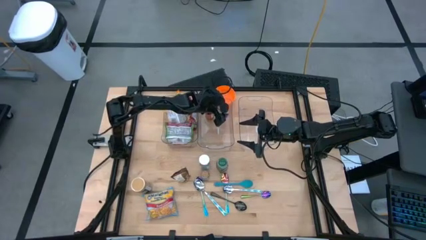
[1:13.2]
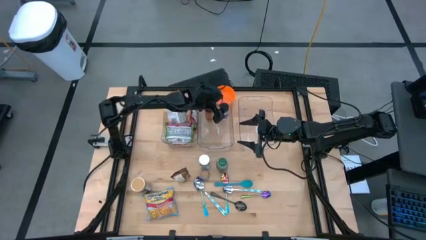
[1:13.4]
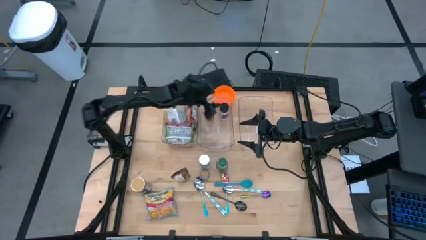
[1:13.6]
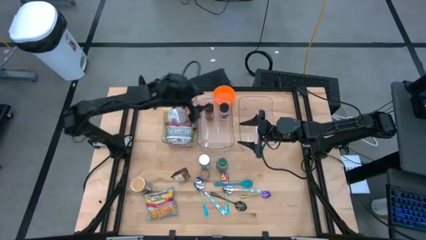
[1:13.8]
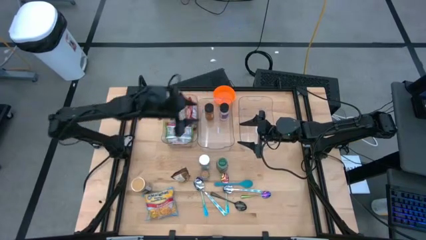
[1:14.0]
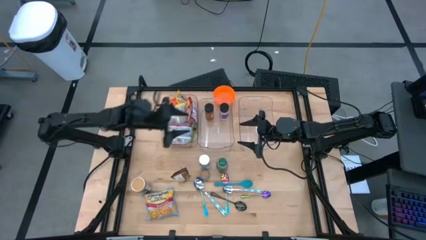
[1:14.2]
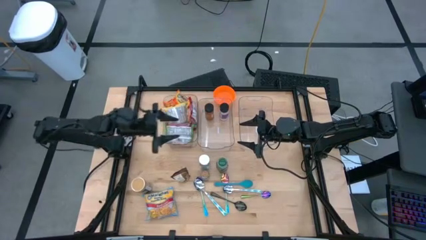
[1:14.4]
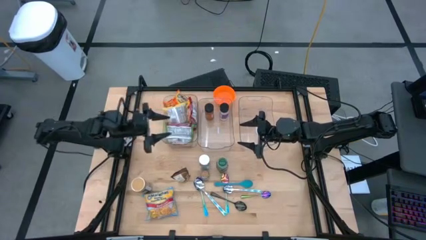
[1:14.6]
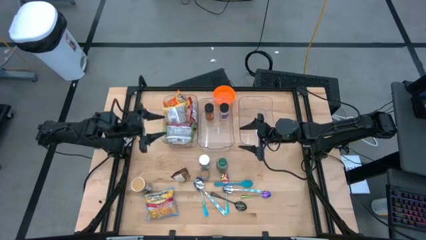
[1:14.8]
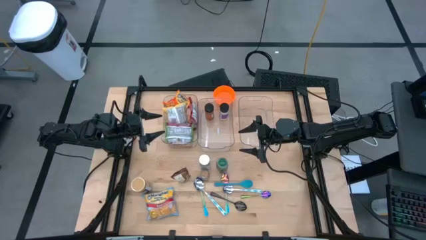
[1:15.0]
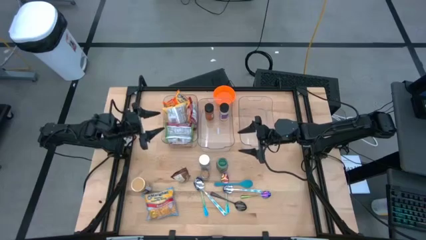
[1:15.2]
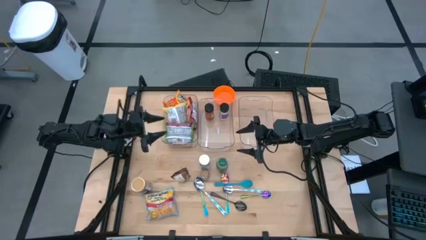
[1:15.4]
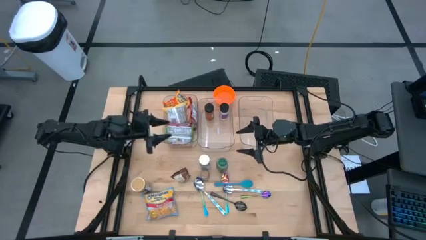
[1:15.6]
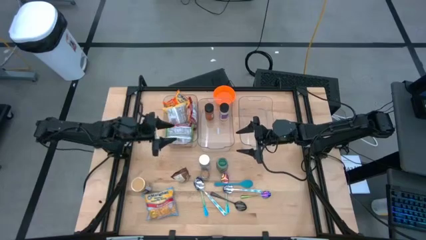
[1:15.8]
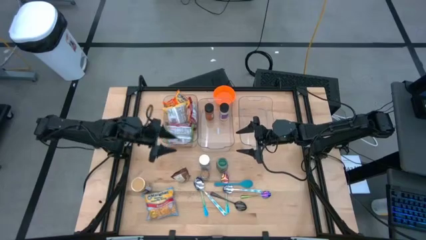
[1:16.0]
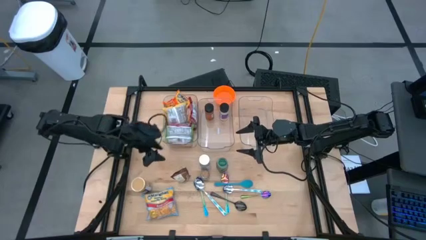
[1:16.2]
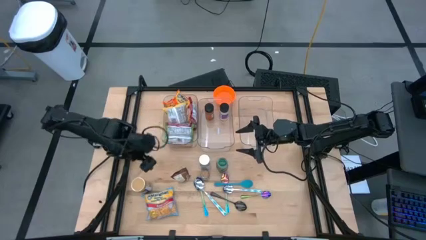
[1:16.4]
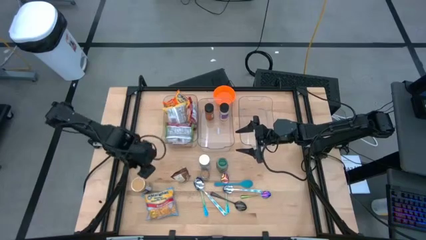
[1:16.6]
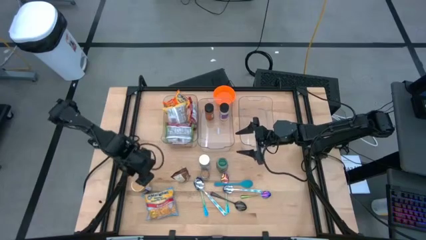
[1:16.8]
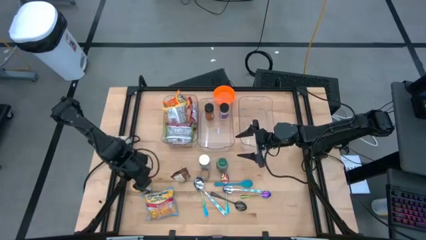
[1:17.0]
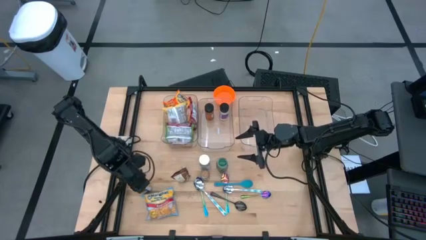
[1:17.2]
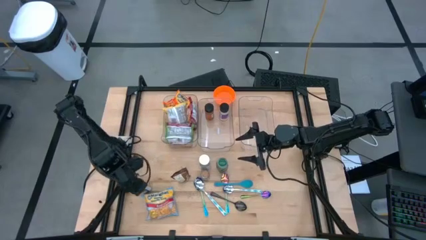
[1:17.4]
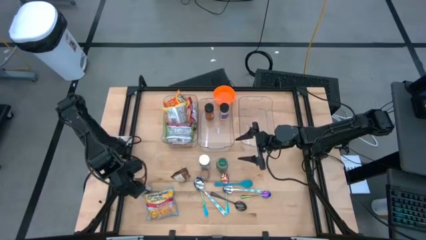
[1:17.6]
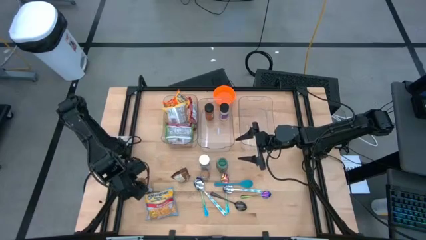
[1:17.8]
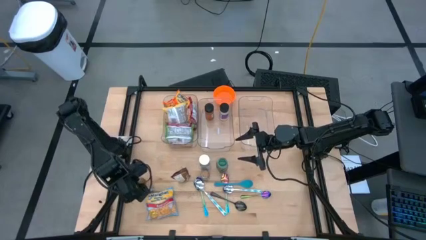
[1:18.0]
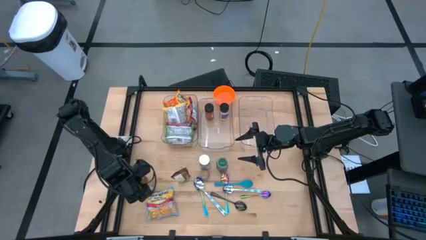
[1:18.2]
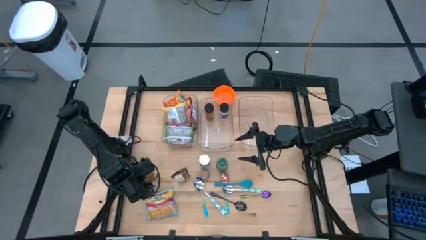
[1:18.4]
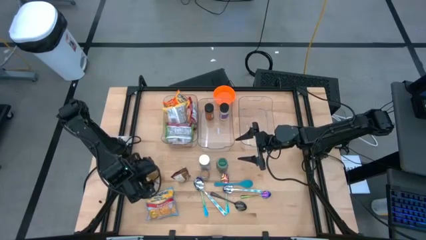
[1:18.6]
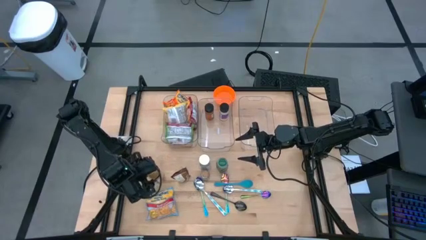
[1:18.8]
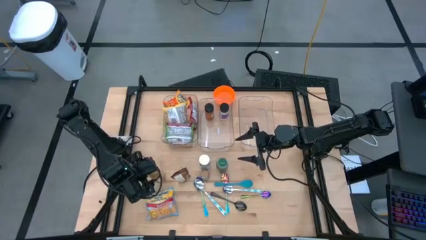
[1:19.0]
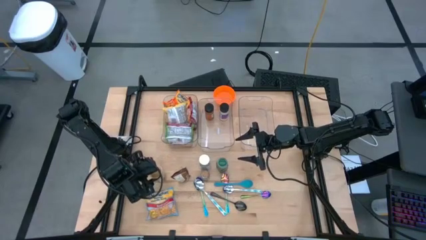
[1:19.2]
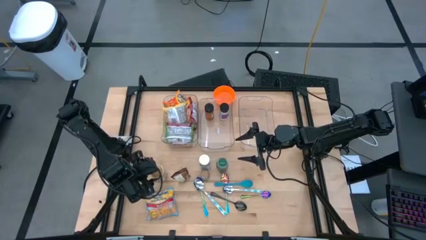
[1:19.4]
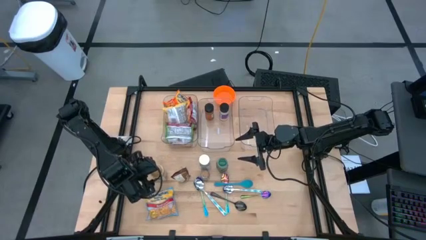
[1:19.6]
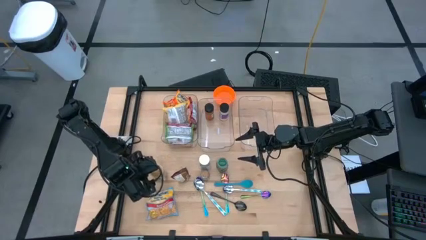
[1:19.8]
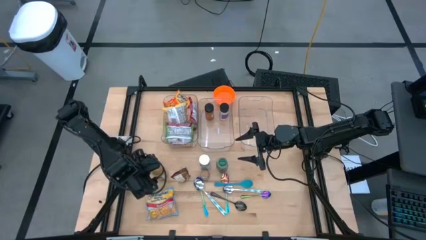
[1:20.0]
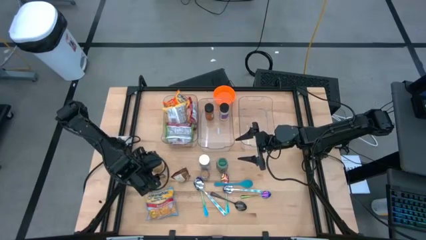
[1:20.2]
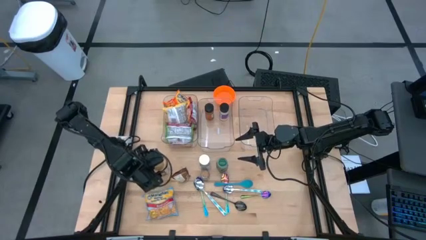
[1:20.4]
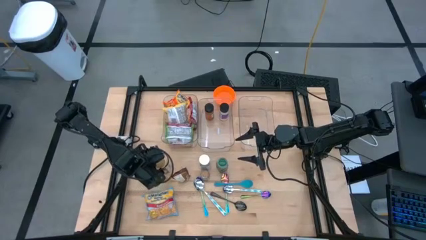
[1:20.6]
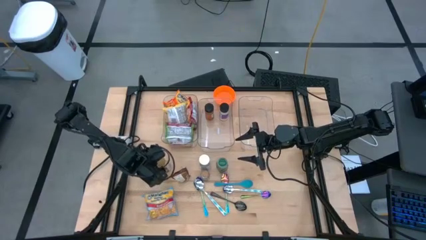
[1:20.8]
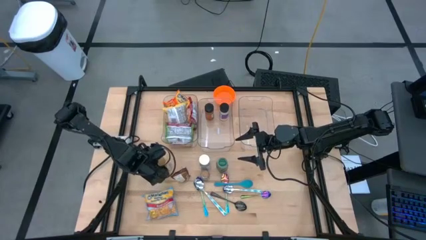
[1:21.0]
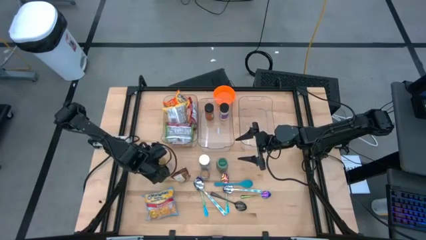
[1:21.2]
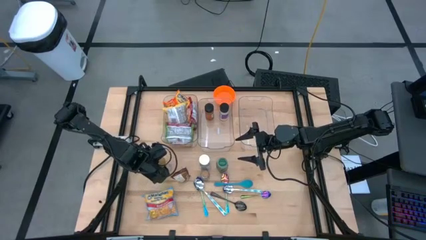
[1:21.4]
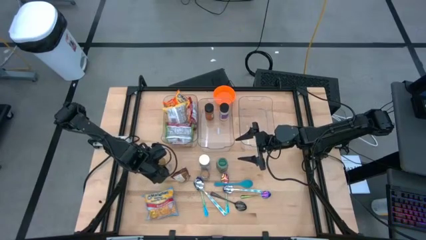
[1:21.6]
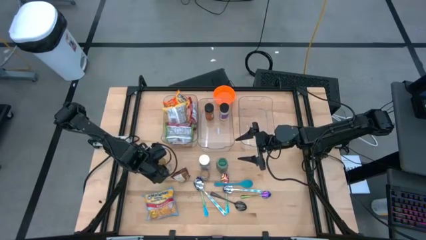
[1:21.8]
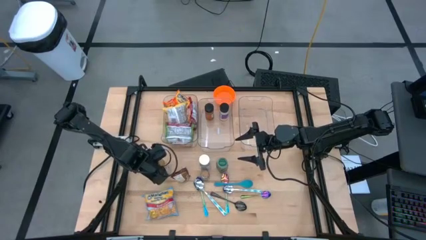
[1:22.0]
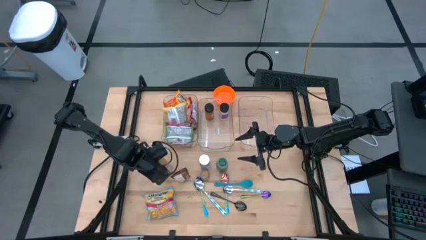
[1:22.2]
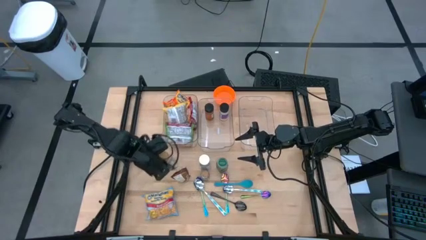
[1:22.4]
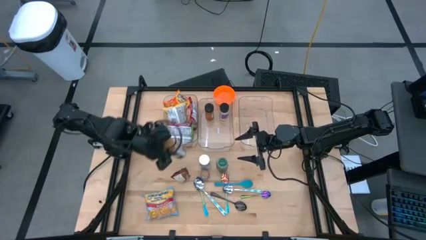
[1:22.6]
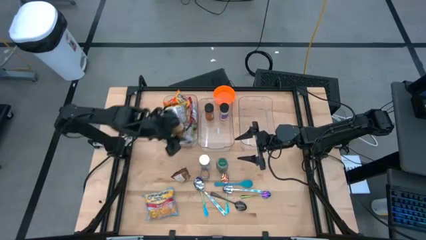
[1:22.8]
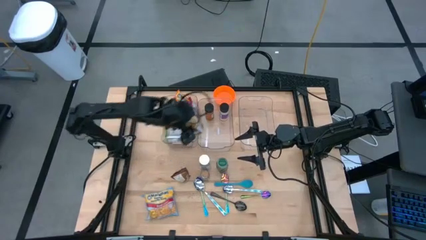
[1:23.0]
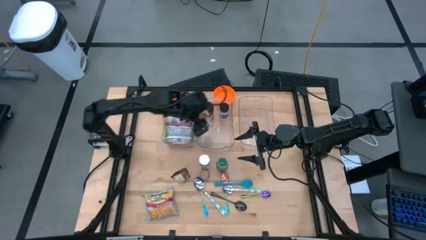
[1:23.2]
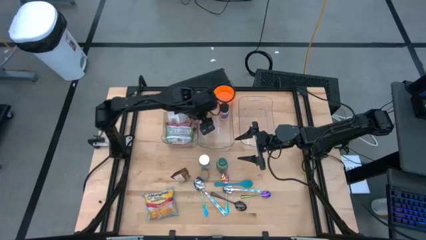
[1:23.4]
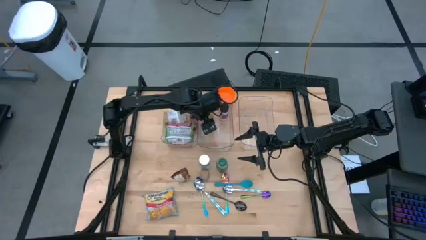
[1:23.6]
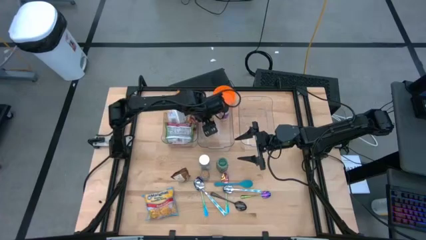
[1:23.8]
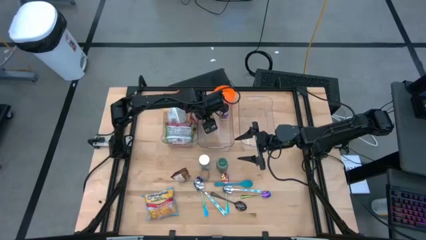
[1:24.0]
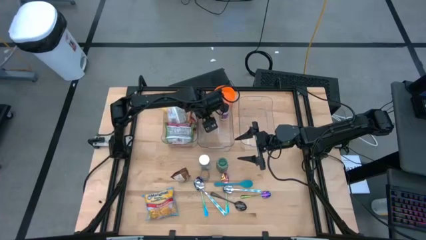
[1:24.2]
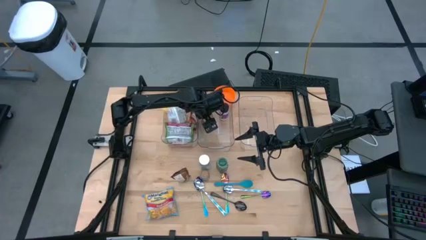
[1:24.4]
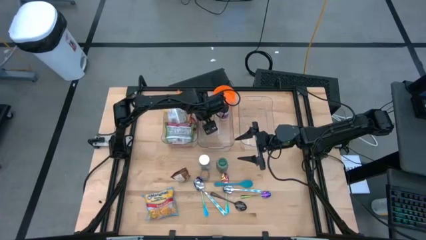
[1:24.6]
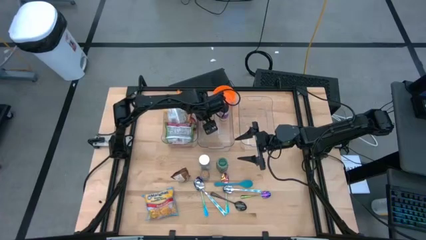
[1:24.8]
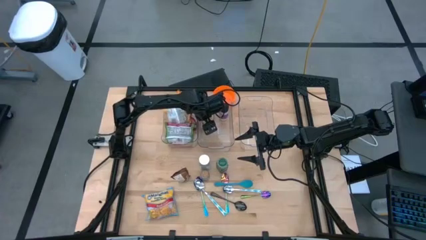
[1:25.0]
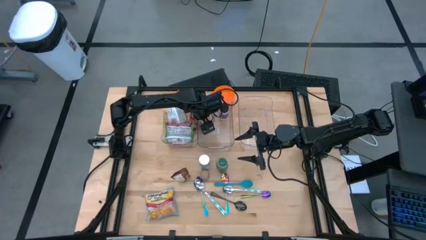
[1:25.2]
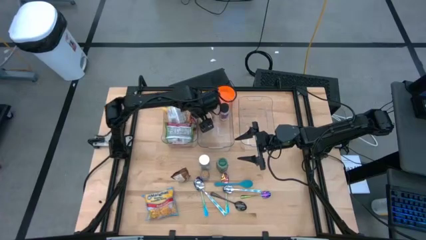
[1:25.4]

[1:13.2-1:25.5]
Task: Pick & Place Food Item
Put the golden seasoning bottle into the middle transparent bin

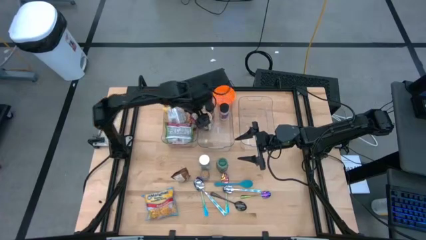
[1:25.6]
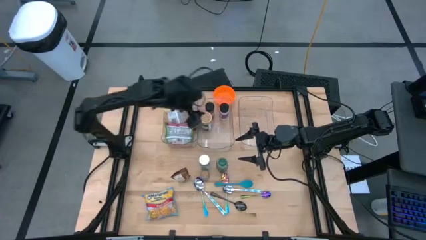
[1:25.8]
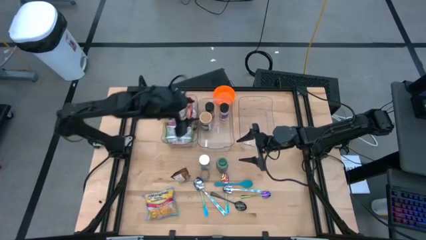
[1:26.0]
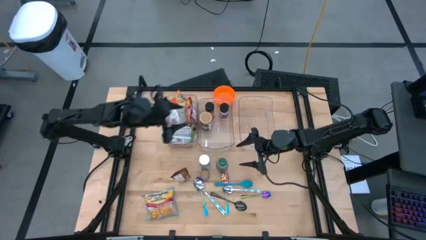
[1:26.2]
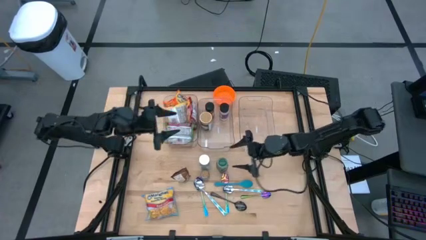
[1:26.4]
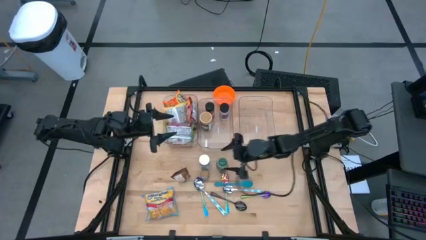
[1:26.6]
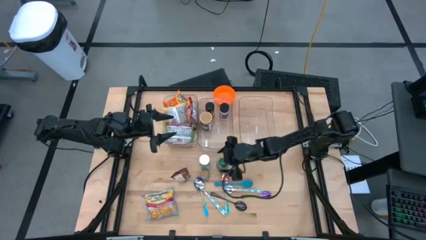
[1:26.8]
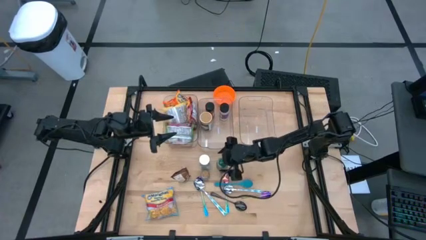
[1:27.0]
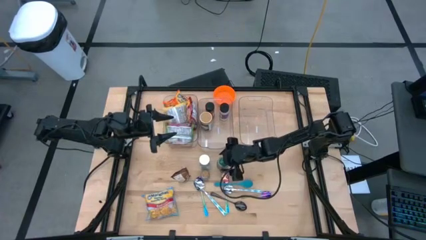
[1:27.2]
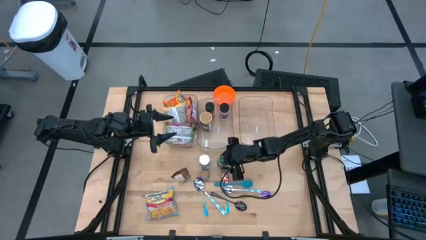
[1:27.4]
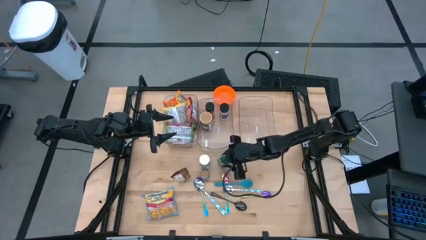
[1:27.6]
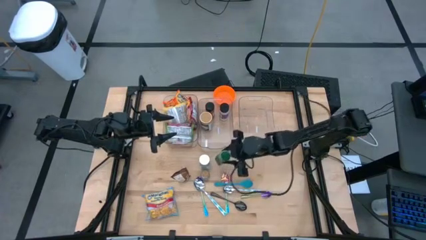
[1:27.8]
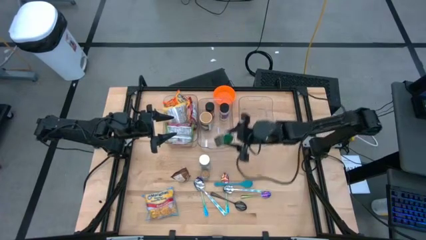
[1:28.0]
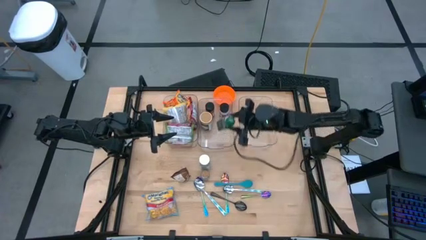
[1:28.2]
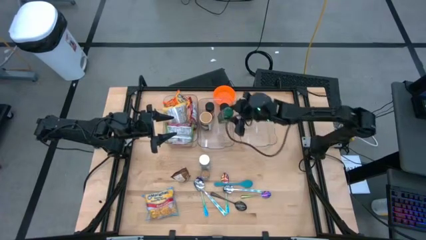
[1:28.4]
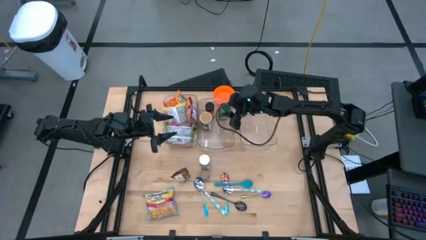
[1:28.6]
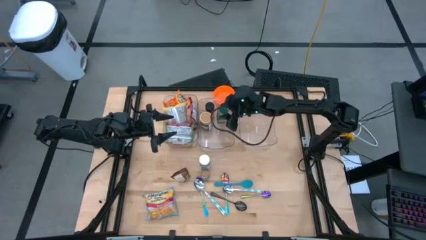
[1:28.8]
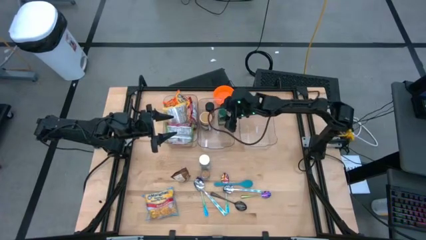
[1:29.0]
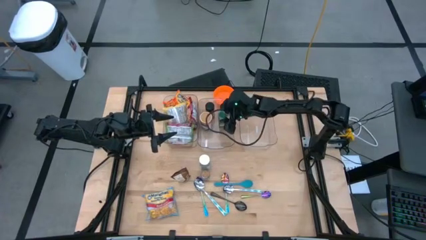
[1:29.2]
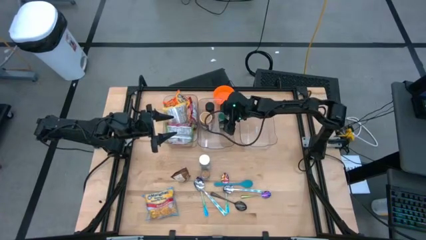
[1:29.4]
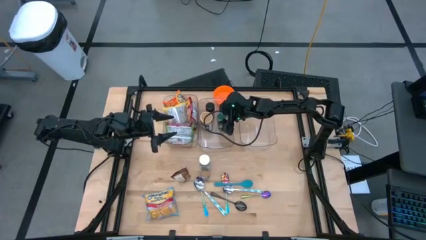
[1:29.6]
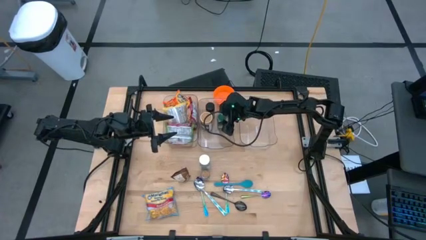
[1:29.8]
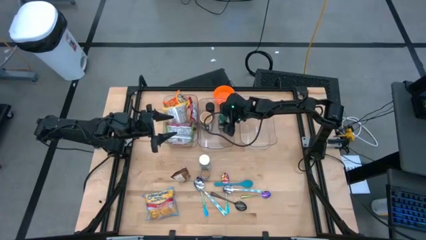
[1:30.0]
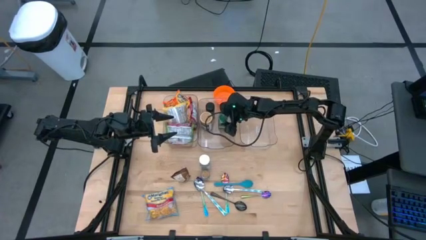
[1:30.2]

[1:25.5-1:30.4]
Put the green seasoning bottle into the middle transparent bin
